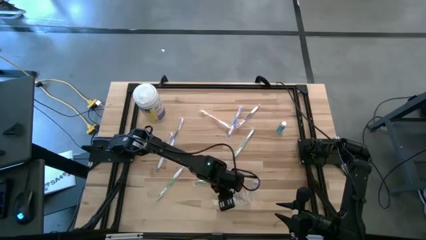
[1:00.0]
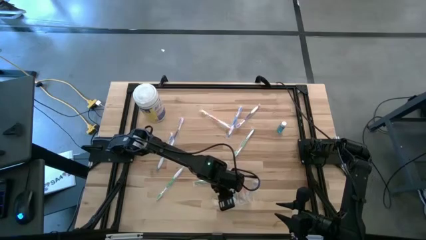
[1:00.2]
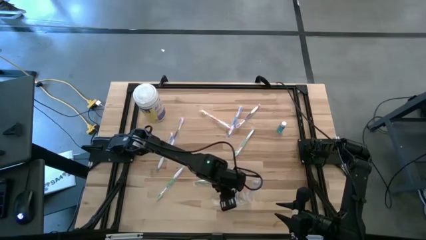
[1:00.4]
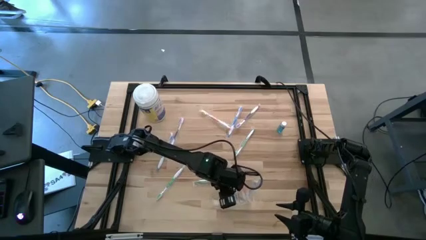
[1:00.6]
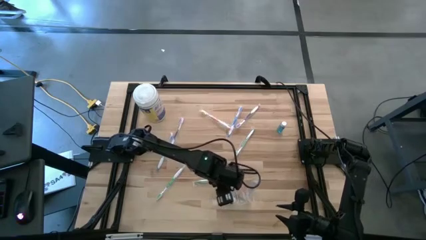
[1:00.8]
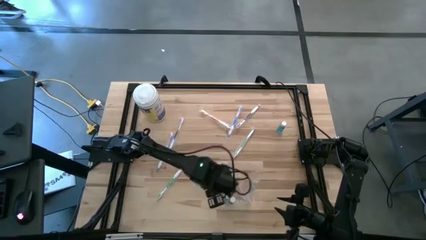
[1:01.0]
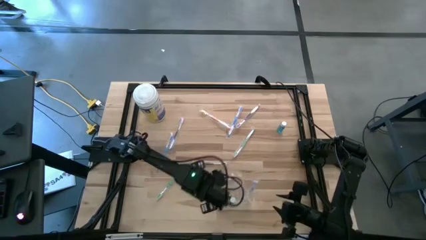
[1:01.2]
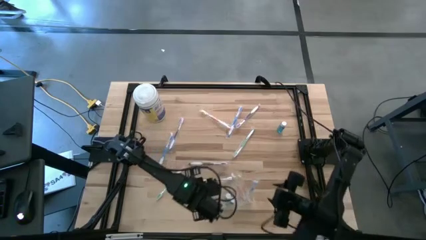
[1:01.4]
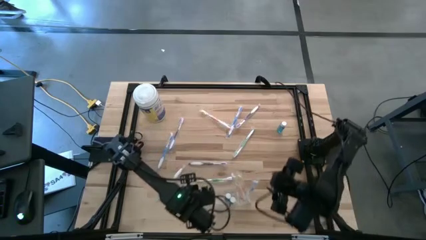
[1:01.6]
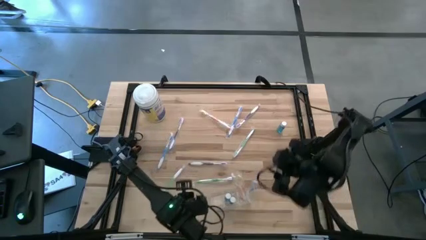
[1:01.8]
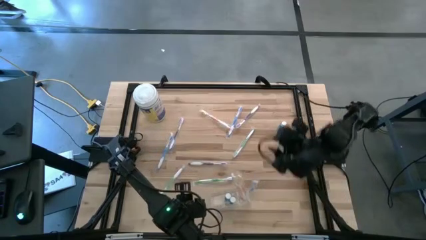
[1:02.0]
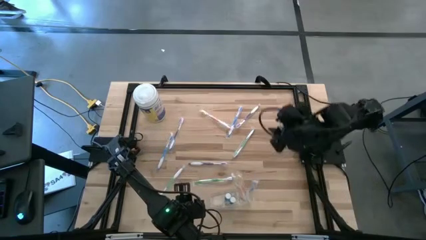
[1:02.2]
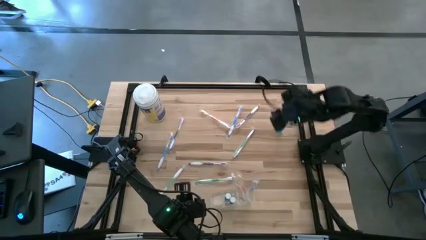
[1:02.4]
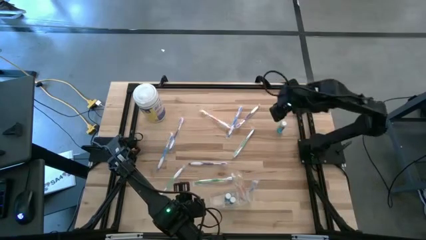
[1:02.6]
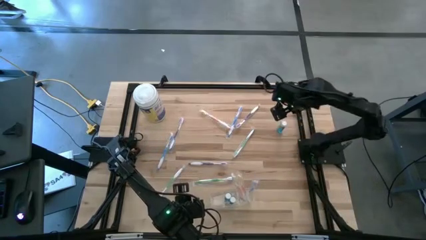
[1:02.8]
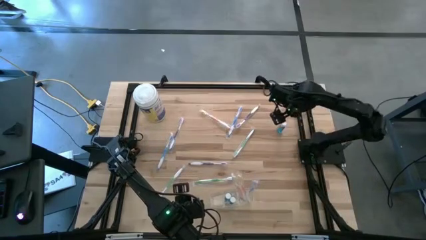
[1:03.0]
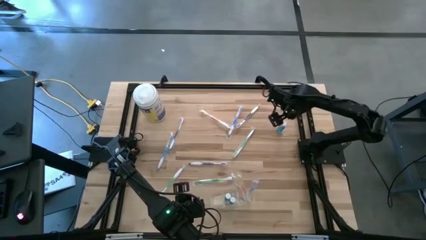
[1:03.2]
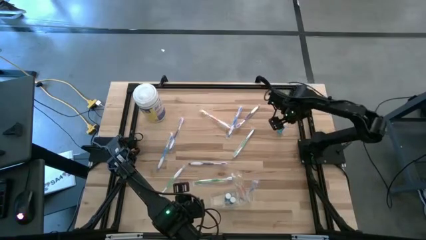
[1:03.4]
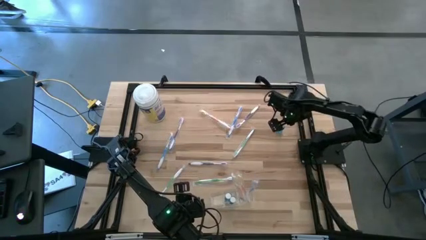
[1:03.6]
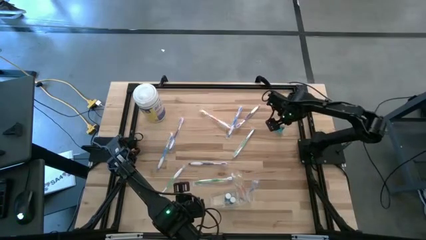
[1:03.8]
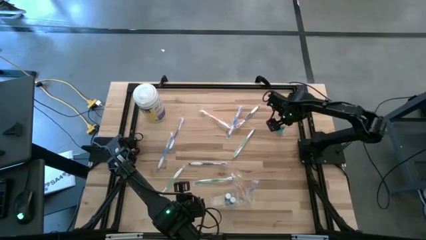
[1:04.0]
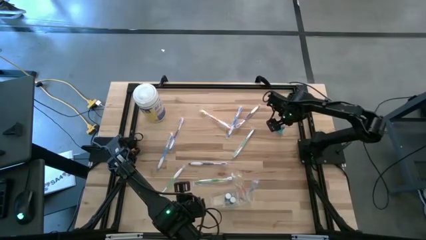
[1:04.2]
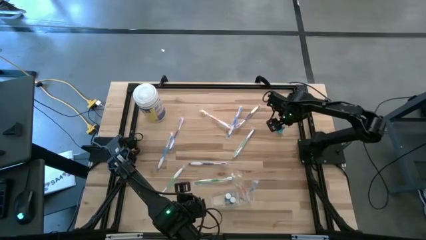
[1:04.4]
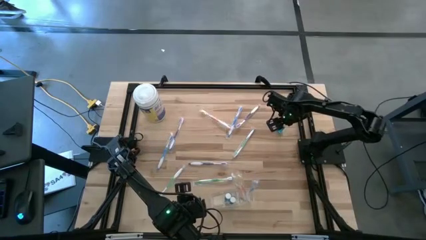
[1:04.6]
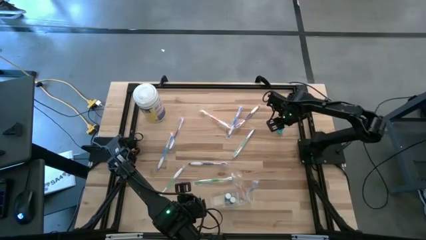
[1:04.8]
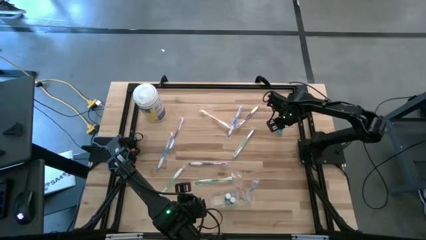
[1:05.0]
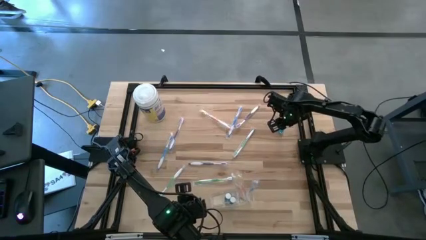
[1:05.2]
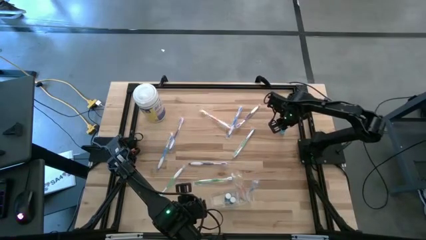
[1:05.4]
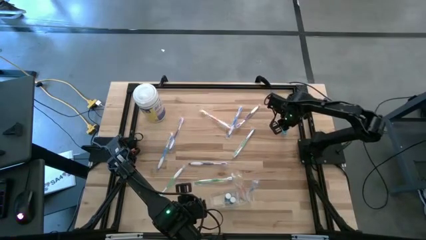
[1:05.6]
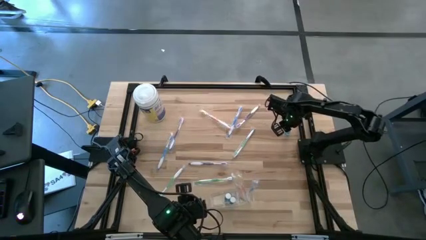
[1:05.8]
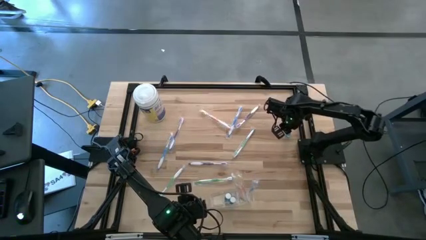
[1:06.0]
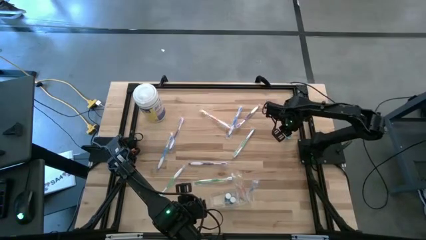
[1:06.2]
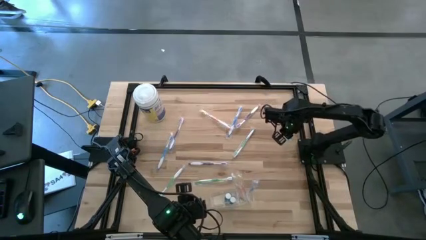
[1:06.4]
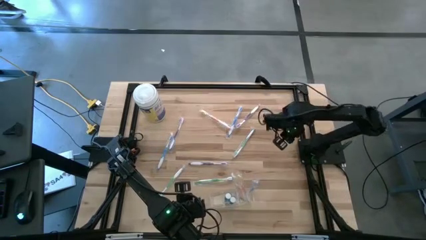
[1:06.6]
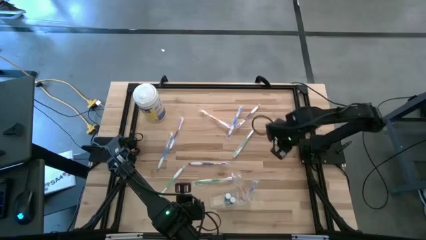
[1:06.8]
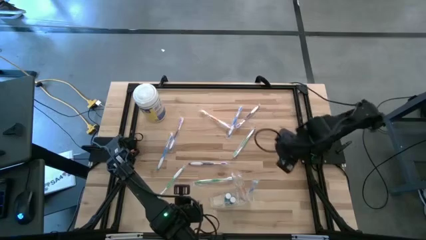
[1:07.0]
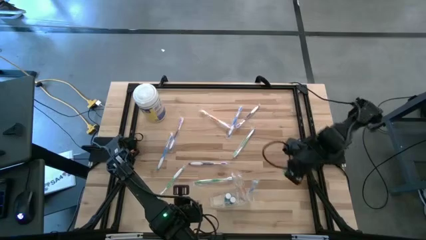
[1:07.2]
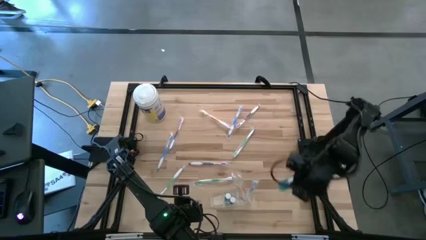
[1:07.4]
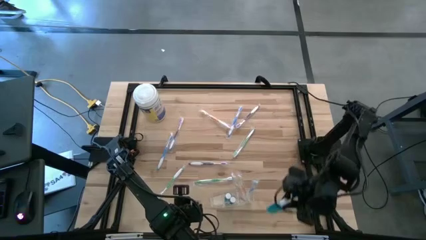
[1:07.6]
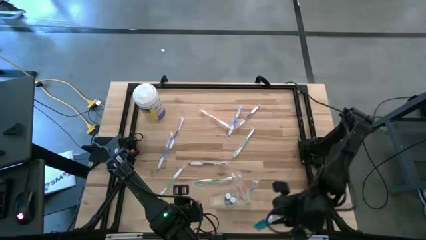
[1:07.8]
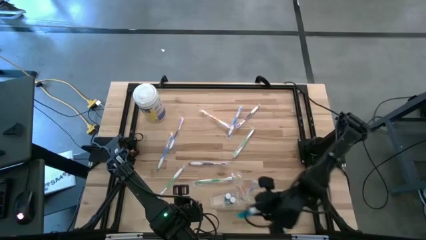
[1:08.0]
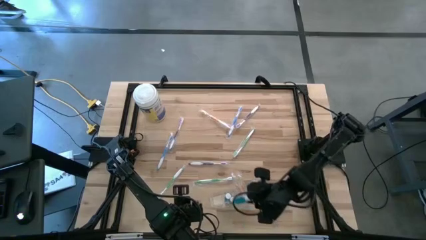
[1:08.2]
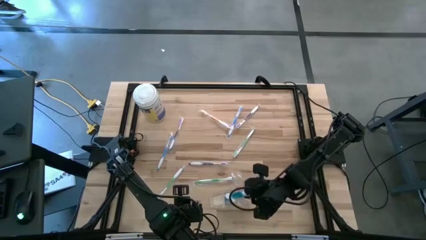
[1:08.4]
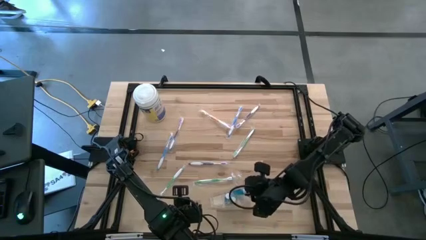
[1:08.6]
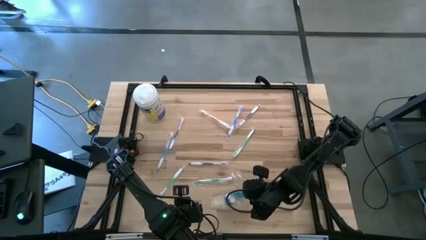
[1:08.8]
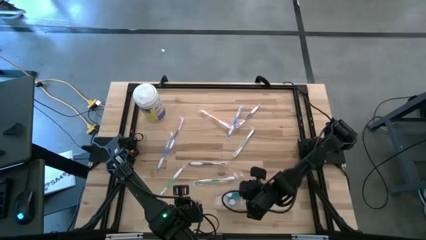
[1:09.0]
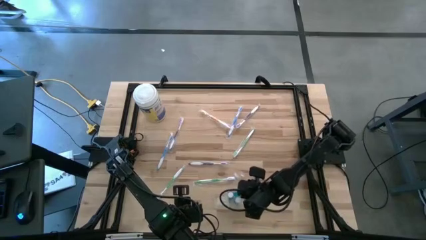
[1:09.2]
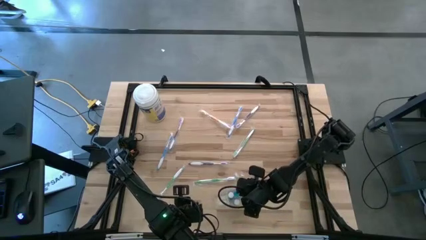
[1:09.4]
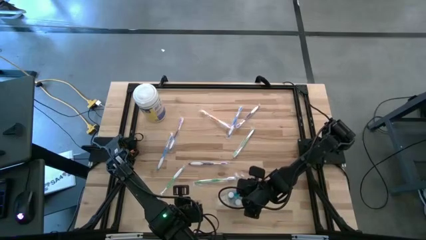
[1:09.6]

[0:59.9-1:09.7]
Task: Pick & Place toothbrushing station
Put the mouthwash into the transparent bin

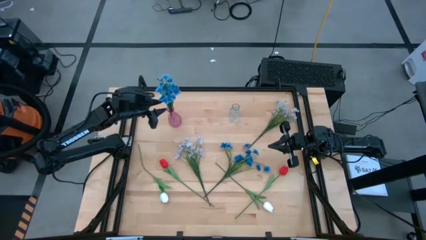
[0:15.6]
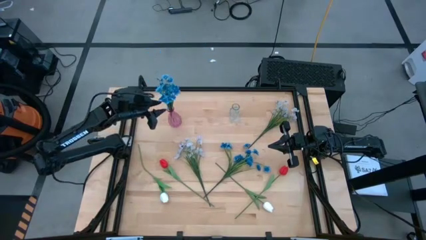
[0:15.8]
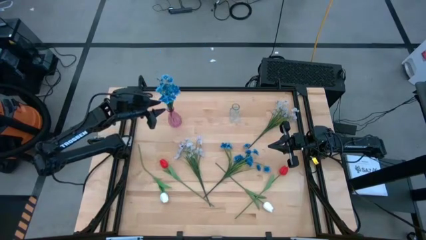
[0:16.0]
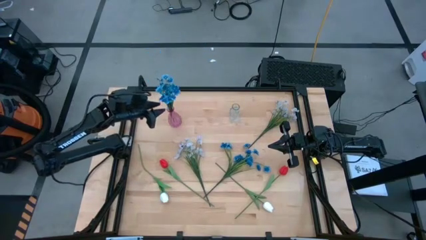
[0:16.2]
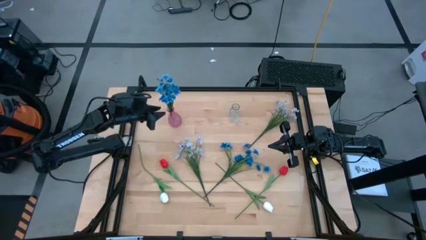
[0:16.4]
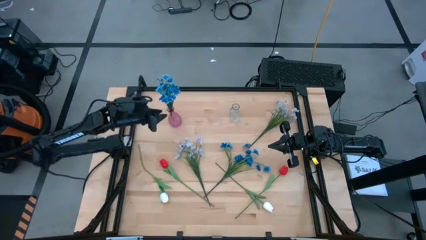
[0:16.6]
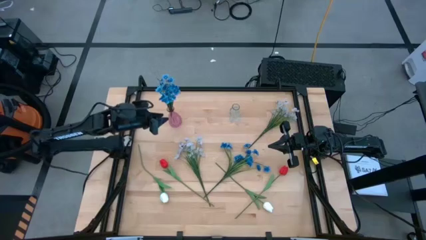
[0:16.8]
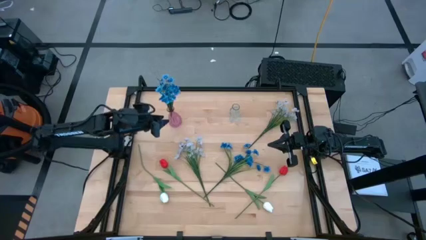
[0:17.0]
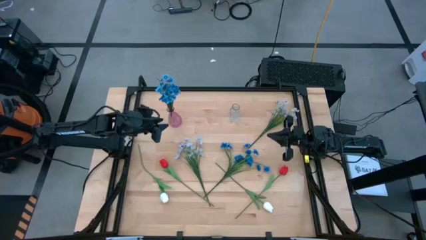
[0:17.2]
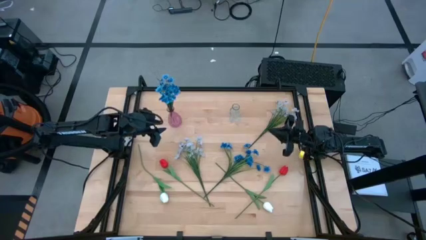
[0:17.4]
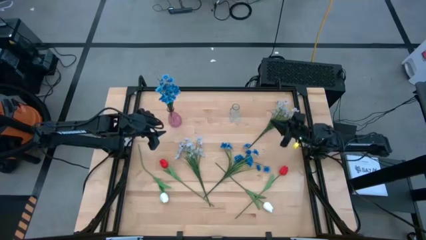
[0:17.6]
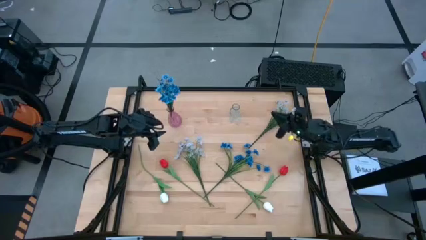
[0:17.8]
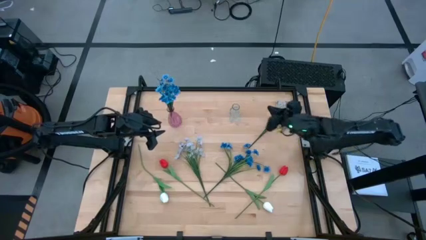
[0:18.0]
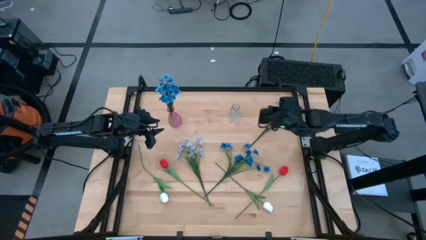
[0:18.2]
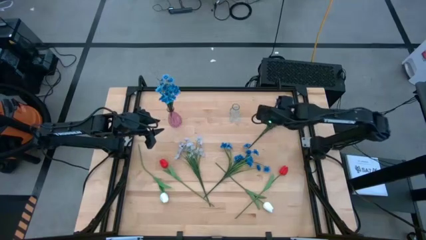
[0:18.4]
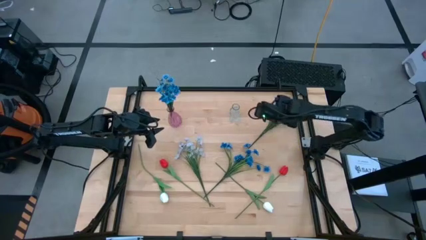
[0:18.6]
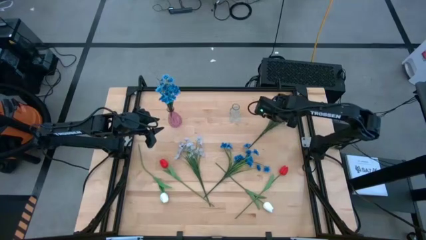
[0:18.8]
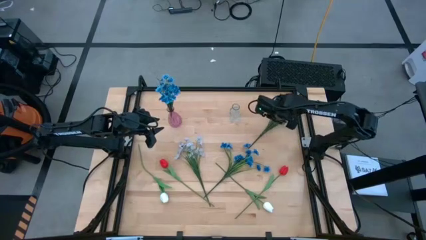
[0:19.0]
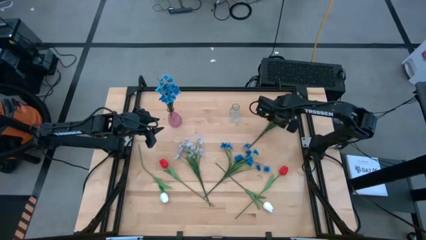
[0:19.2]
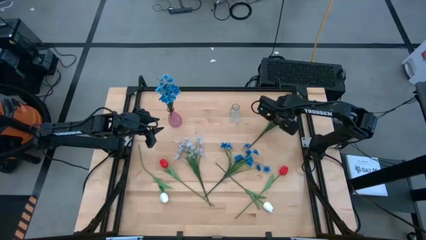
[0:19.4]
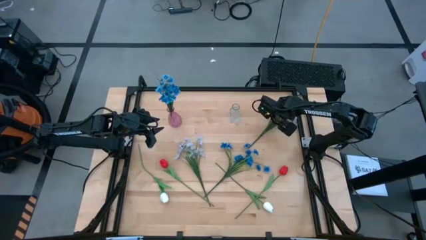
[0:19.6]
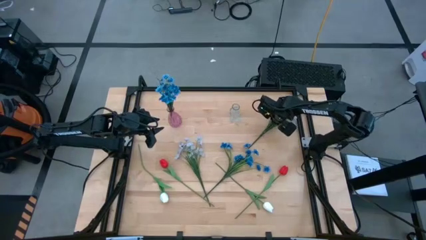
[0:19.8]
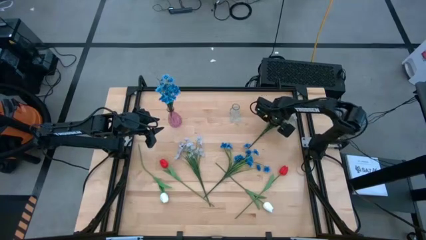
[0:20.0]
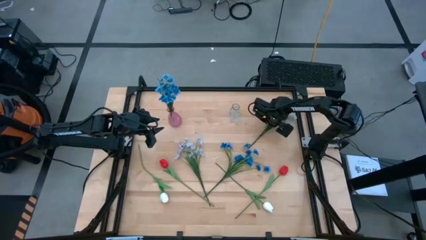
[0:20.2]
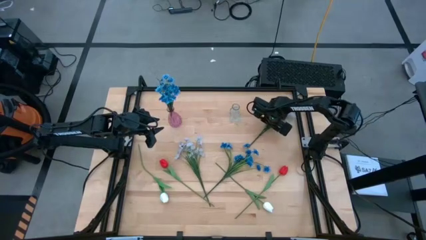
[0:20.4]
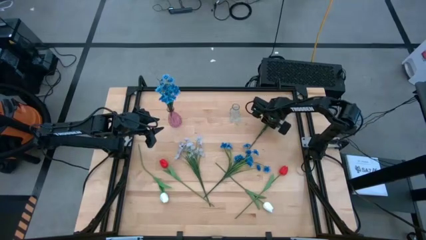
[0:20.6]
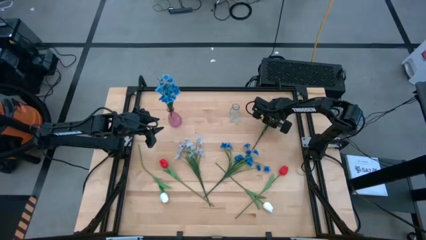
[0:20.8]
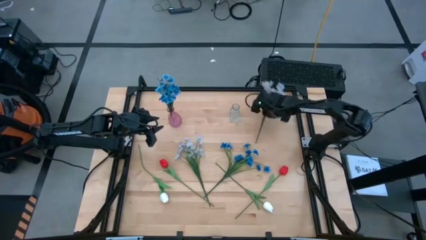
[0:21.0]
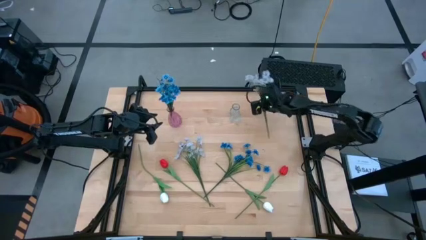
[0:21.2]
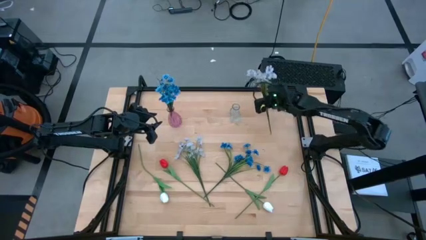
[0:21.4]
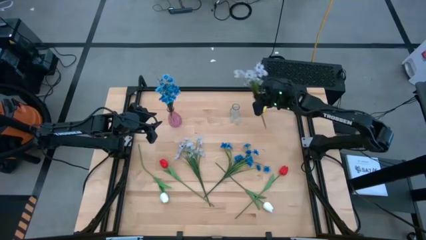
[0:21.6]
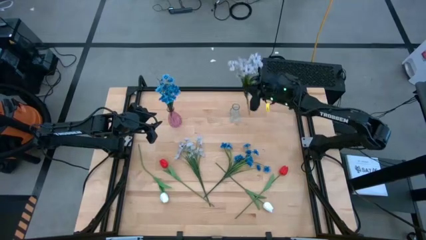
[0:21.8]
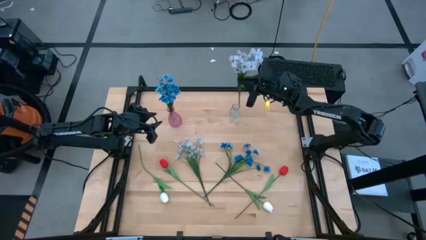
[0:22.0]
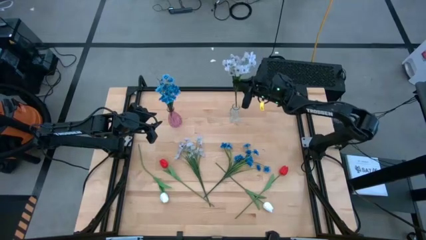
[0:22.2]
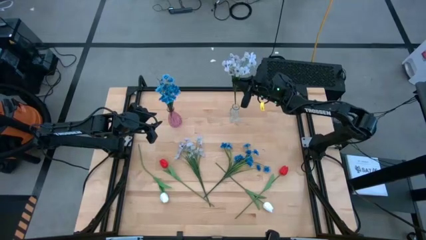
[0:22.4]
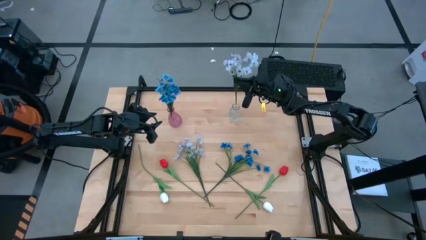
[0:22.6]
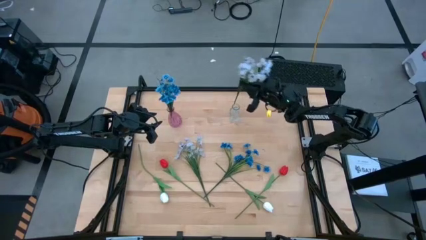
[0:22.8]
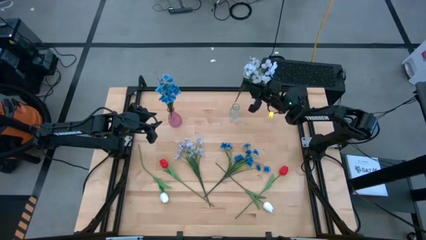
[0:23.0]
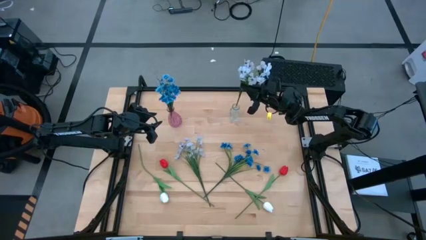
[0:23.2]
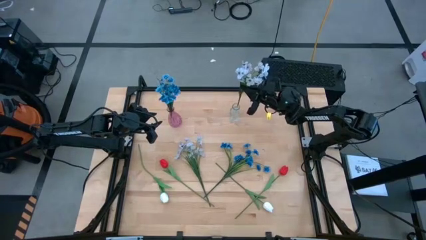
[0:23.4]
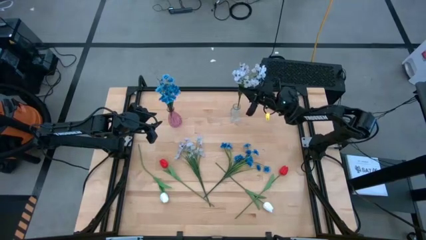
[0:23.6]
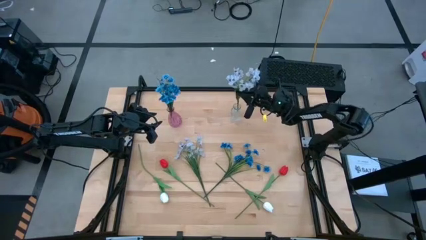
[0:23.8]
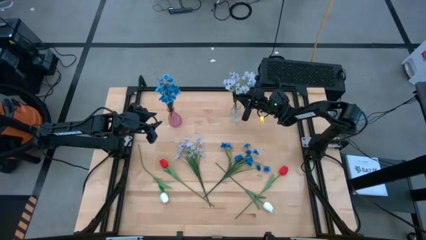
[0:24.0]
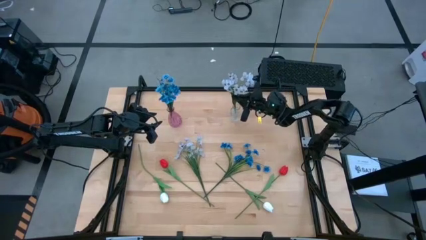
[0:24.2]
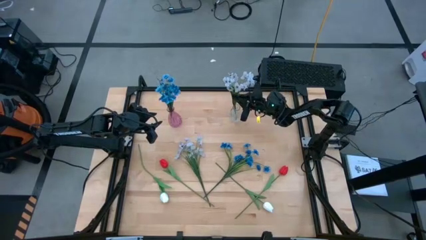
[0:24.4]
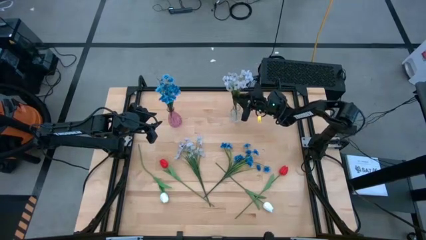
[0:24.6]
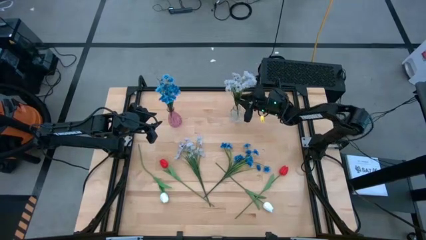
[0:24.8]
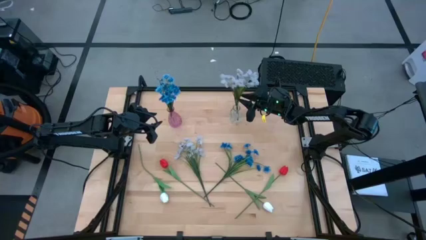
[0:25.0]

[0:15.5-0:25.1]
Task: Sort flowers into vase by color
Put the top white flowers into the transparent vase
